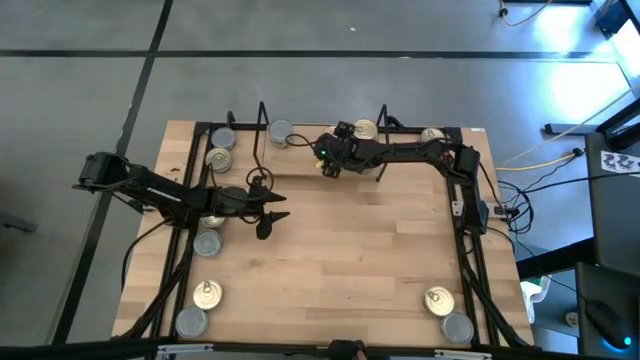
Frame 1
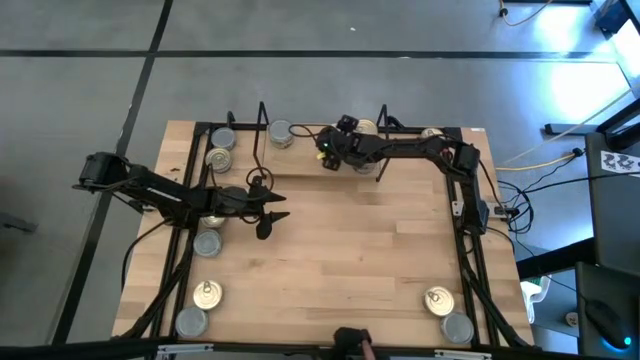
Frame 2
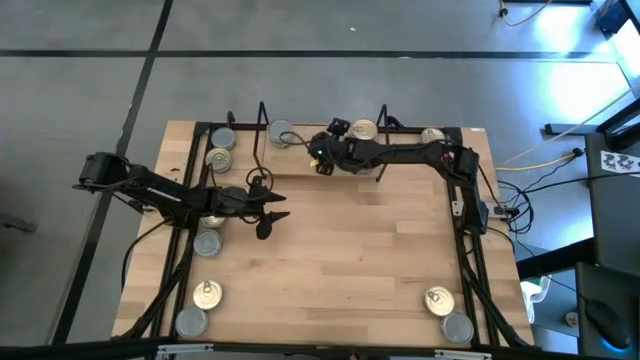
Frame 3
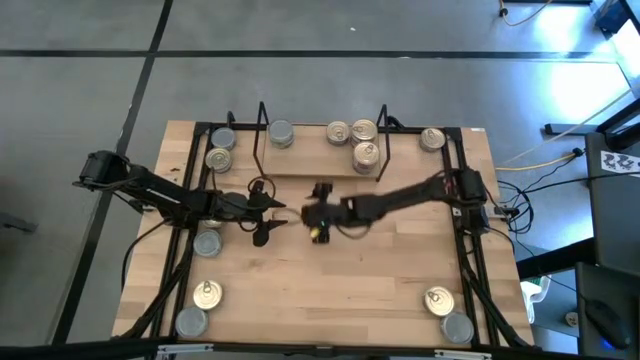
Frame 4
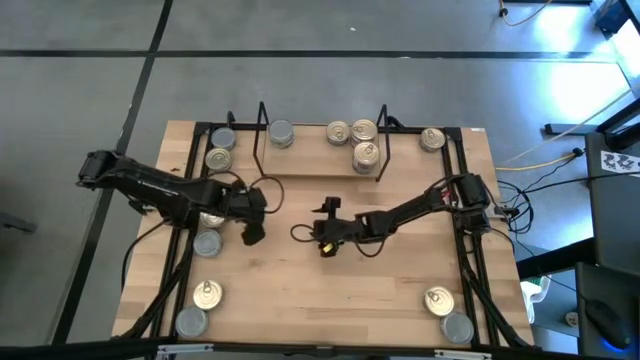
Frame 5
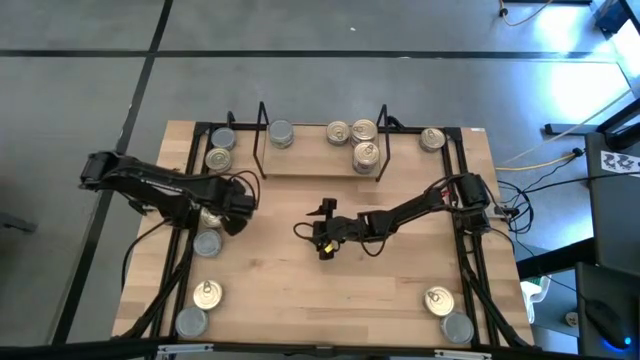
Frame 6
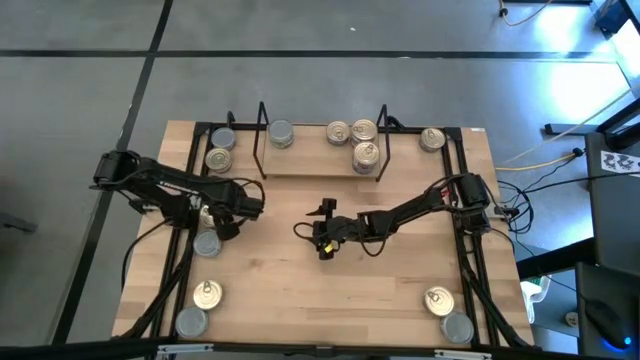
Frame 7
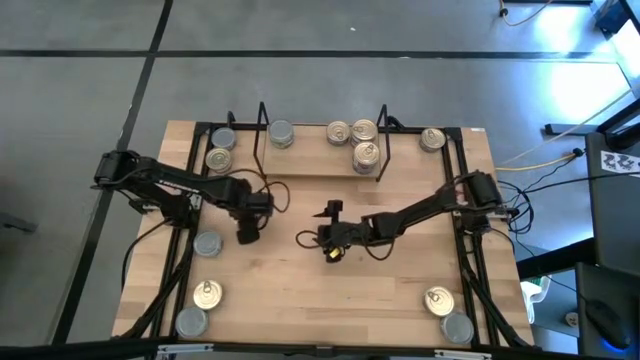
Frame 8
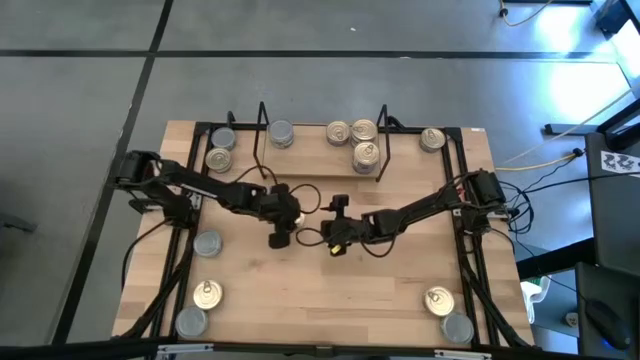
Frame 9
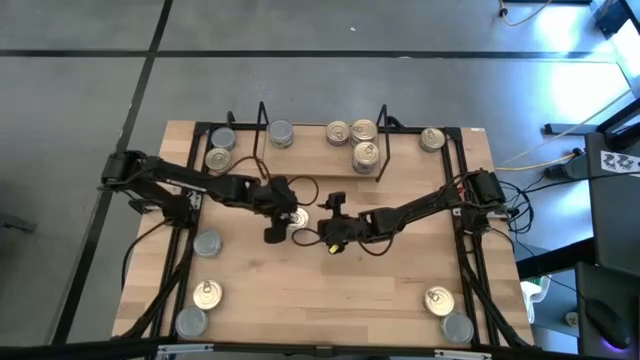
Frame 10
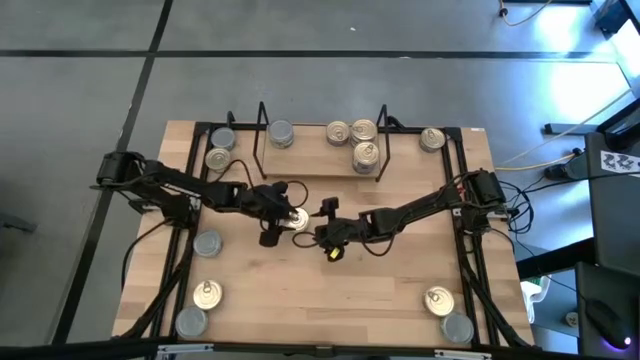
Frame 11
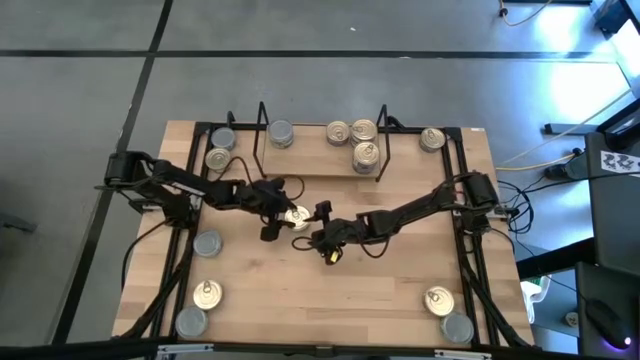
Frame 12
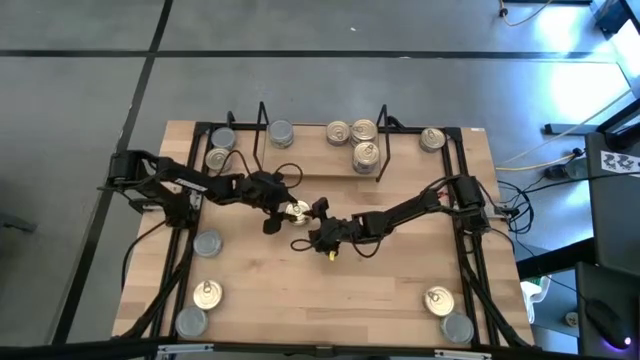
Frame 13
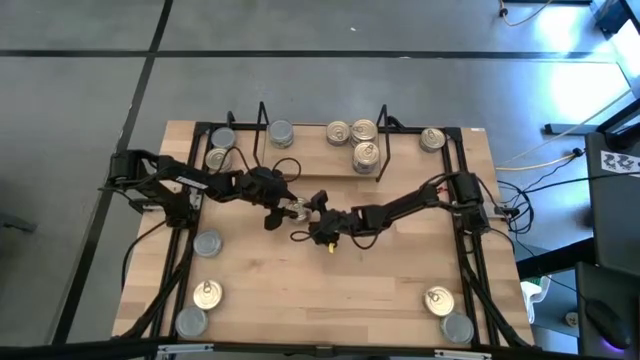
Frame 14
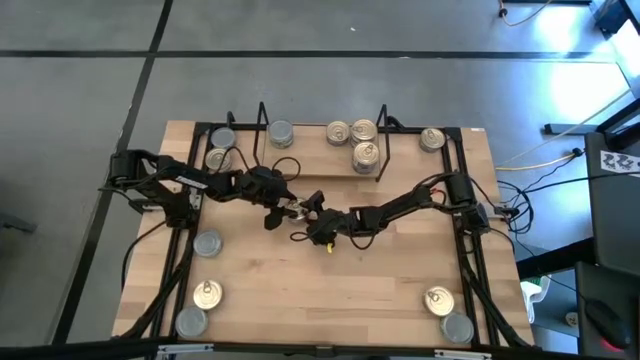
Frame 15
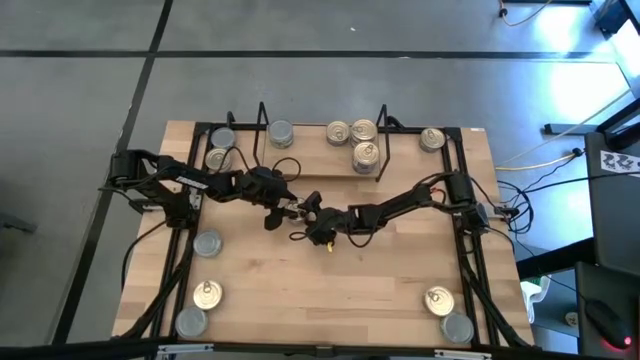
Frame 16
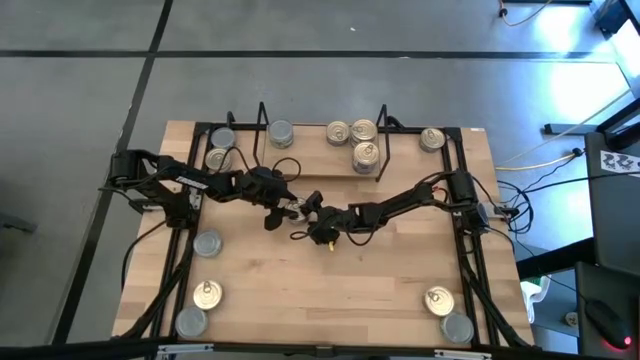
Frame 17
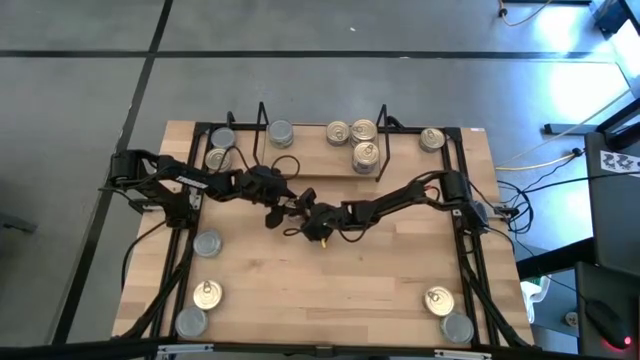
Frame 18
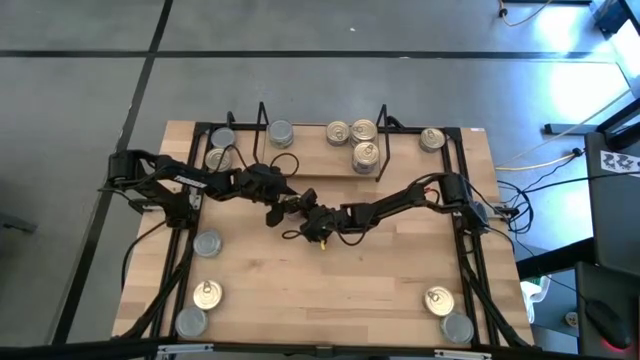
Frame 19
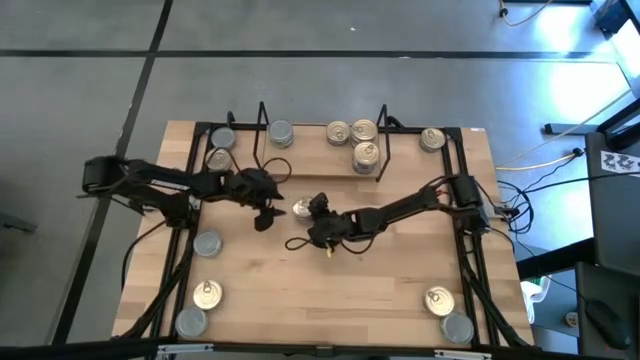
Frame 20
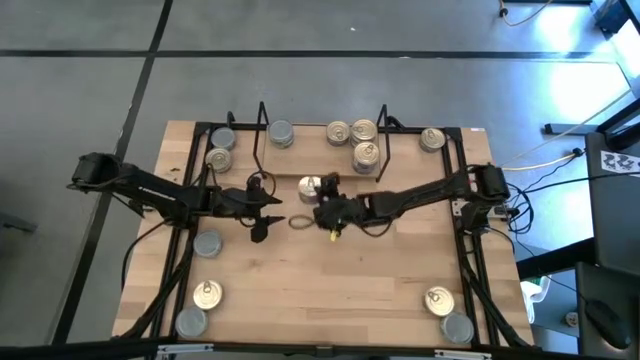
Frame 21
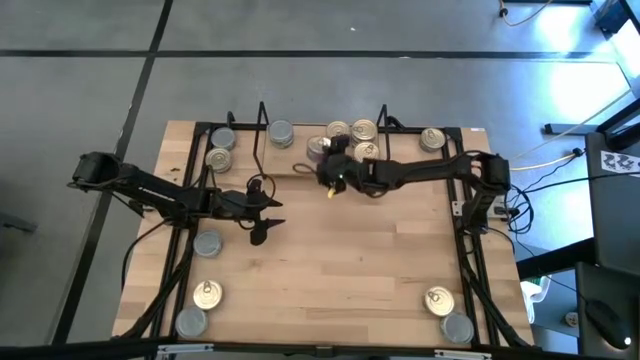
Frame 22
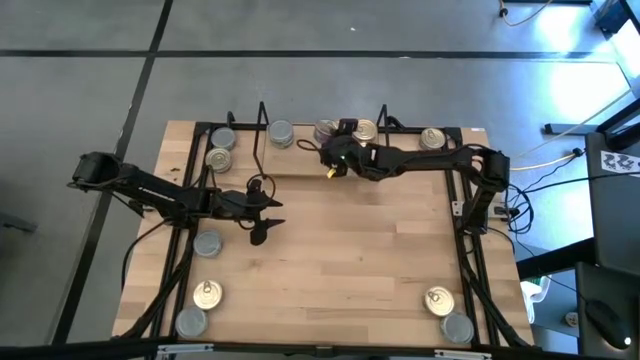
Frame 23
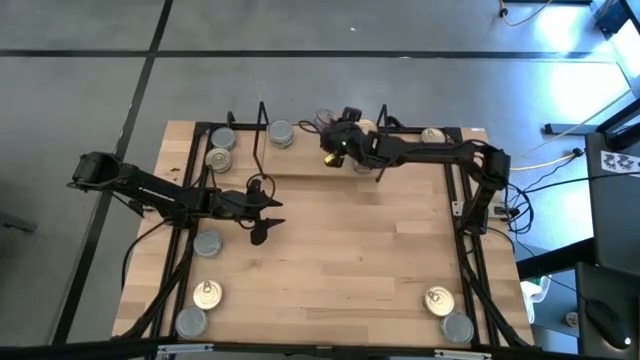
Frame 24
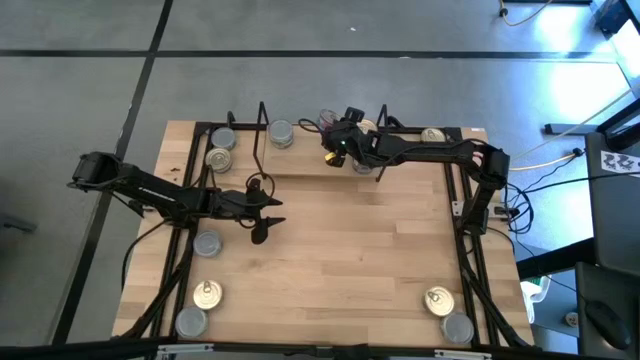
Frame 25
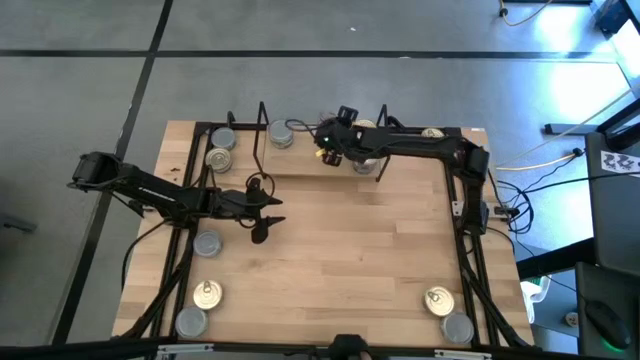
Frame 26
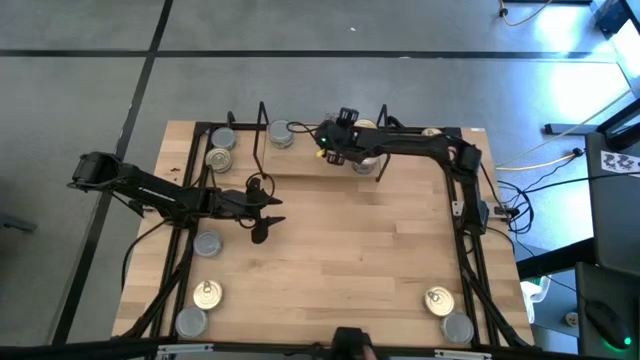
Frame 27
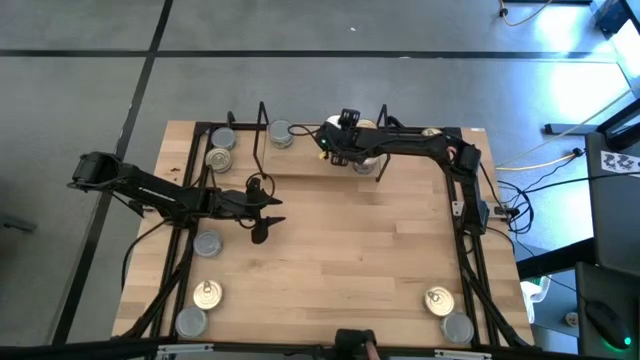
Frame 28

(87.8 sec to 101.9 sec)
Task: Stack canned seafood by type on shelf
Stack the blue-pink tuna can on top of the other blue-pink can on the shelf

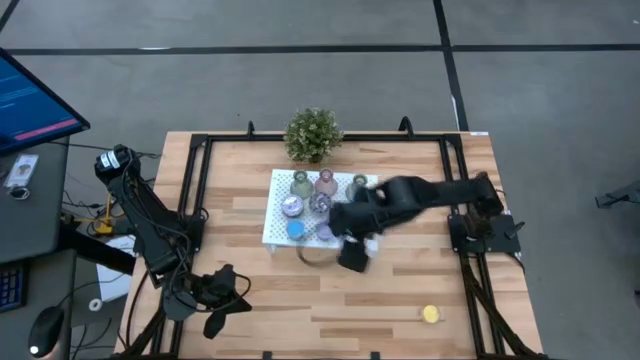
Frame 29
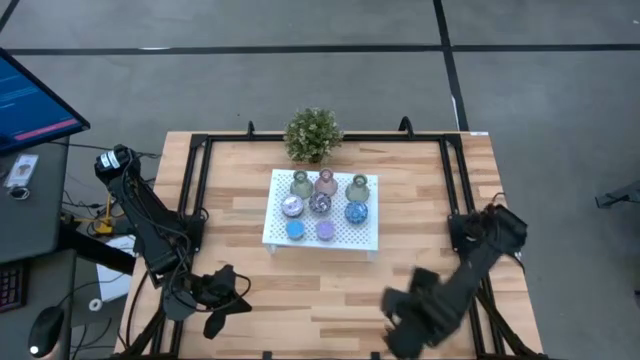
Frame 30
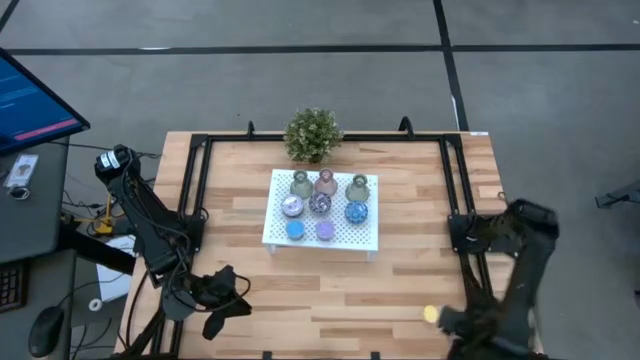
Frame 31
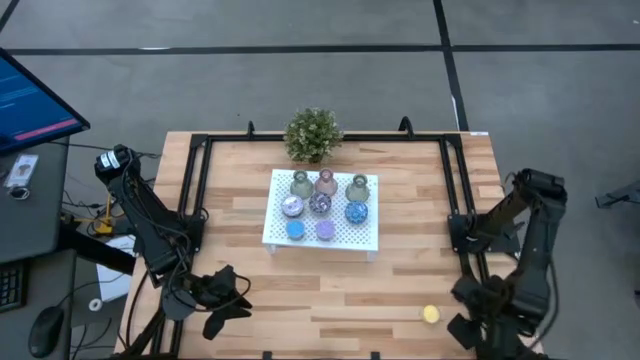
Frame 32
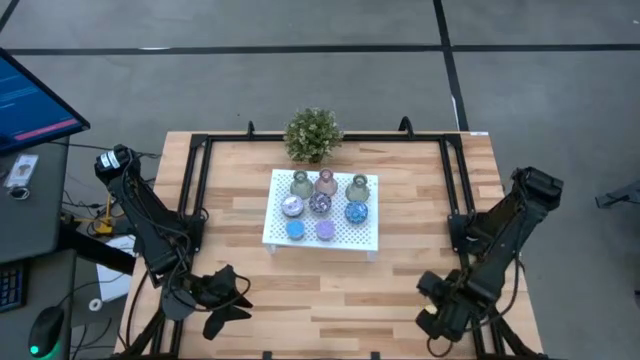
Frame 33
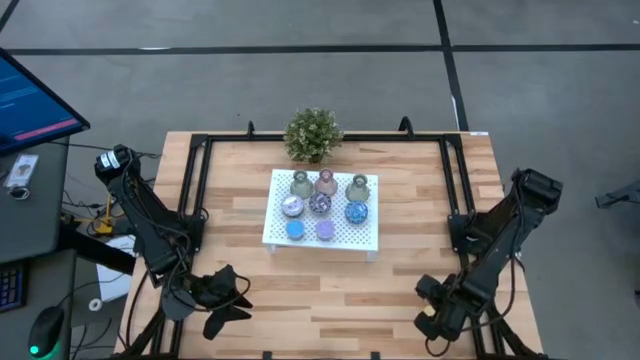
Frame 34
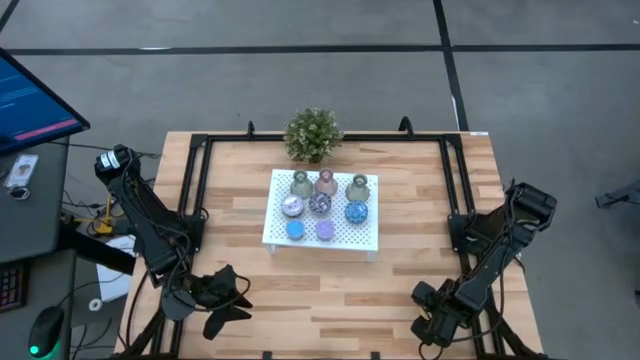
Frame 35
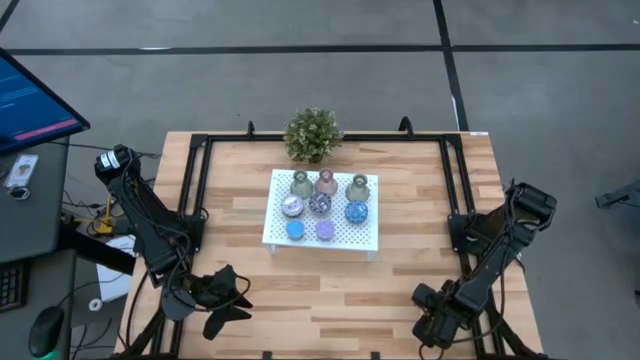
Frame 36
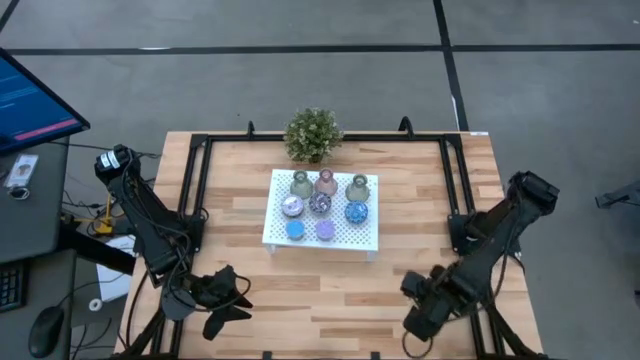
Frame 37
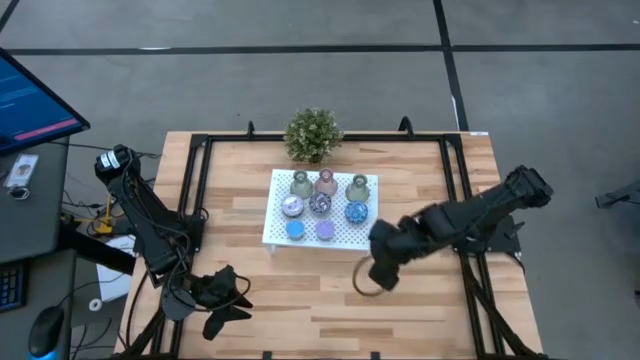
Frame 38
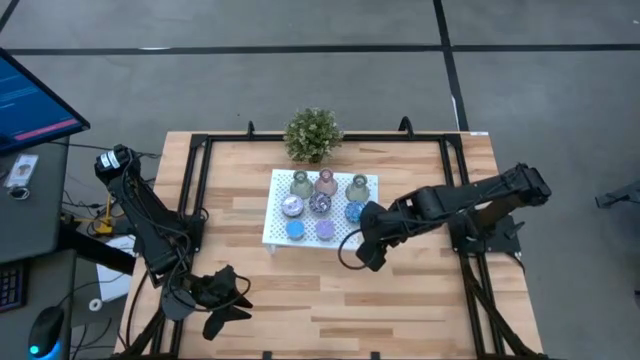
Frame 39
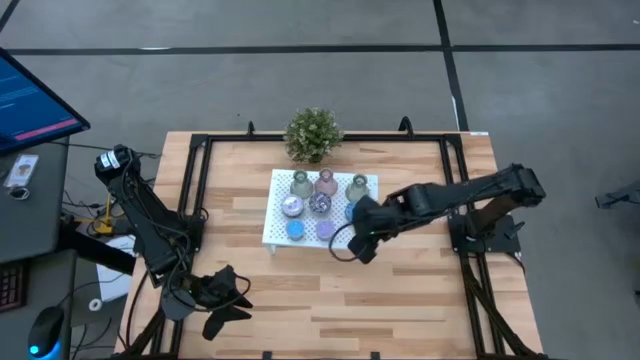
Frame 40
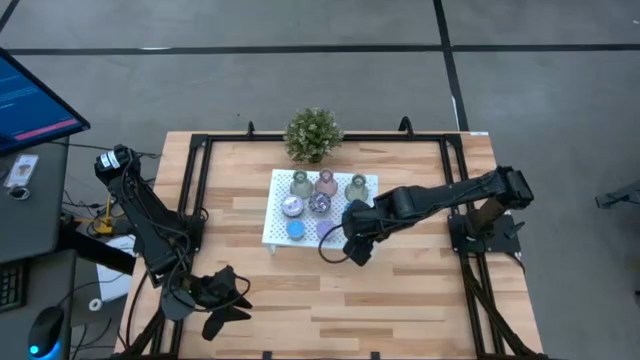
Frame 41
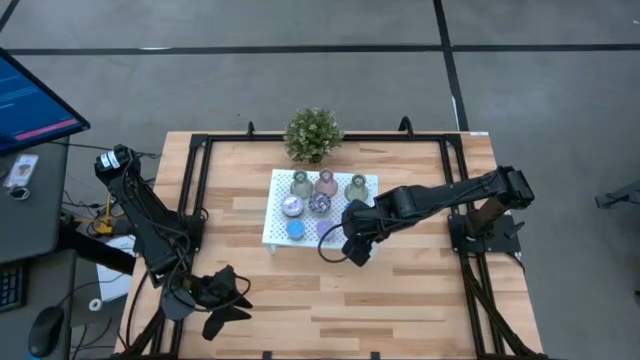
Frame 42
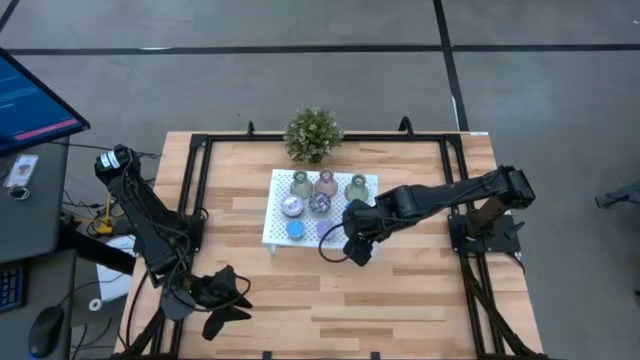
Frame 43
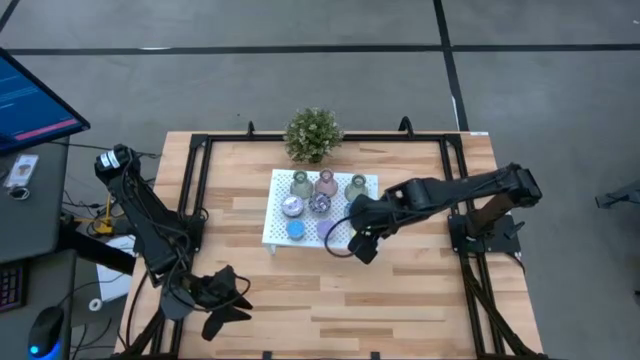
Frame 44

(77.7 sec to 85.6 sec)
Task: Pick & Place candle stick holders
Put the yellow candle on the shelf
